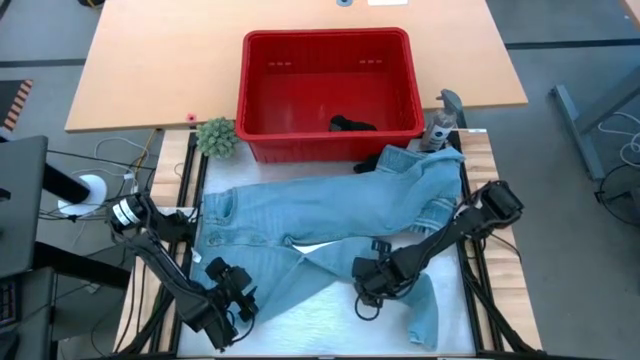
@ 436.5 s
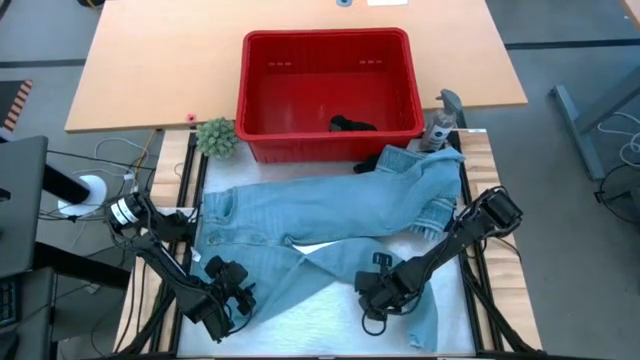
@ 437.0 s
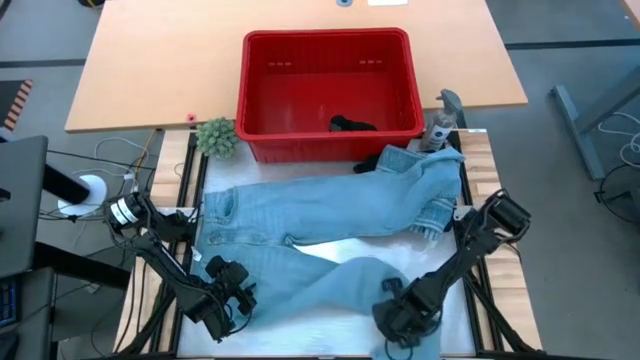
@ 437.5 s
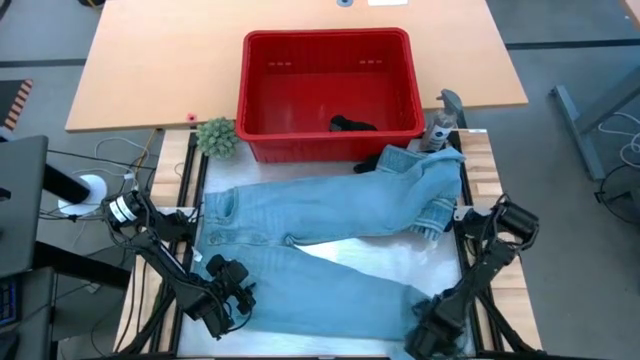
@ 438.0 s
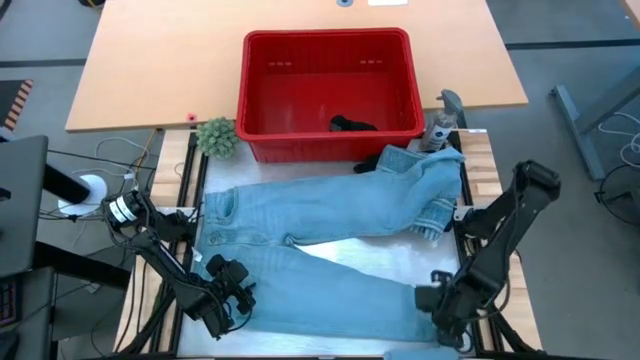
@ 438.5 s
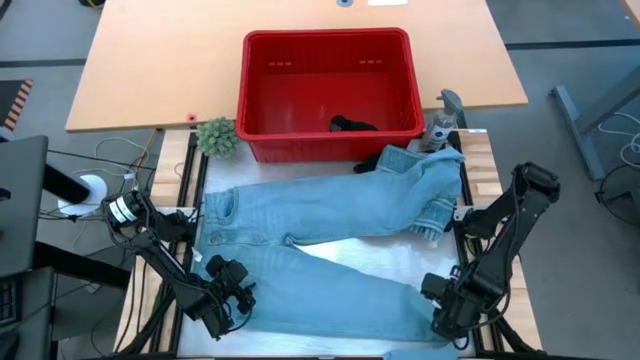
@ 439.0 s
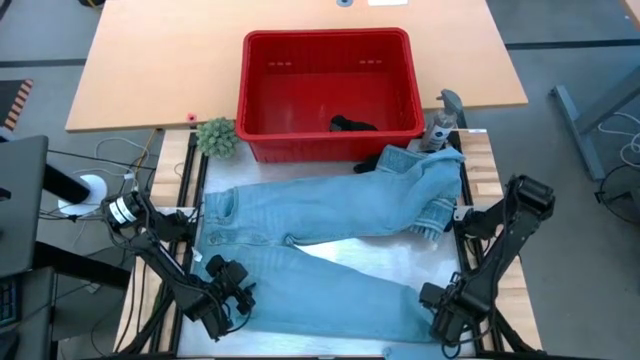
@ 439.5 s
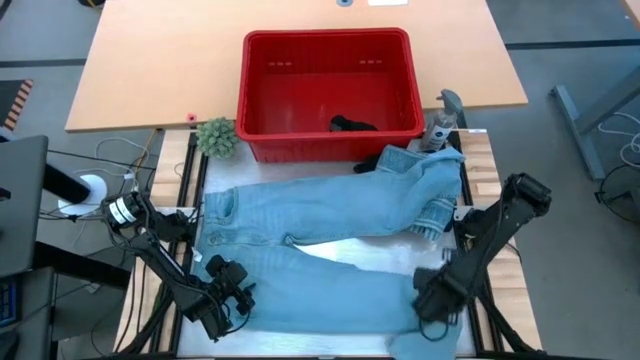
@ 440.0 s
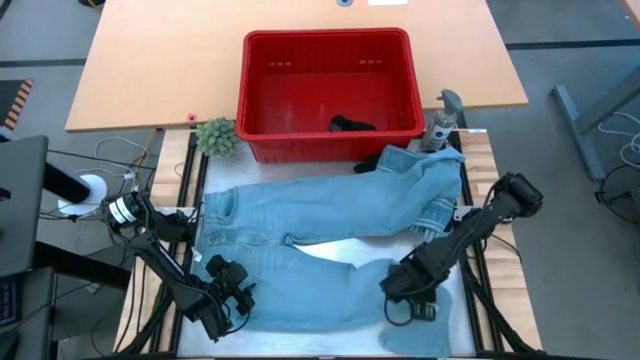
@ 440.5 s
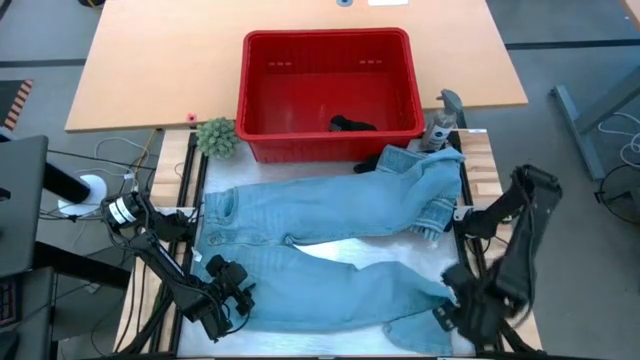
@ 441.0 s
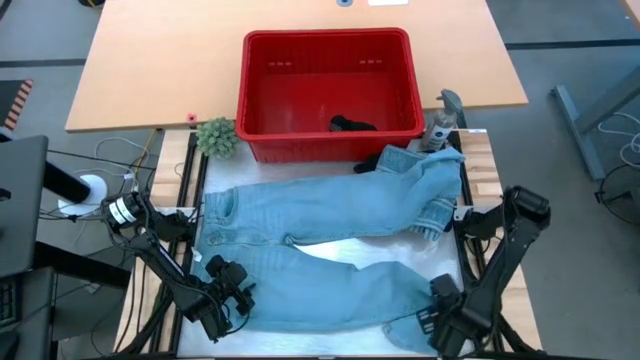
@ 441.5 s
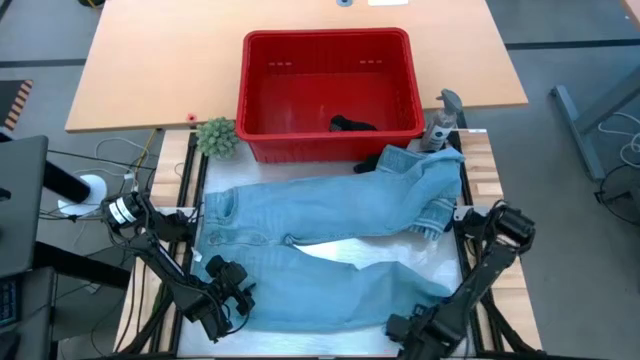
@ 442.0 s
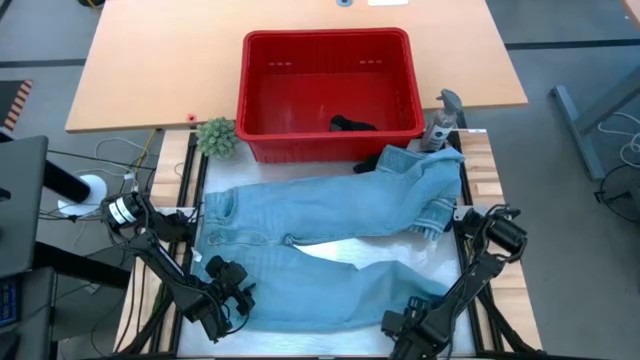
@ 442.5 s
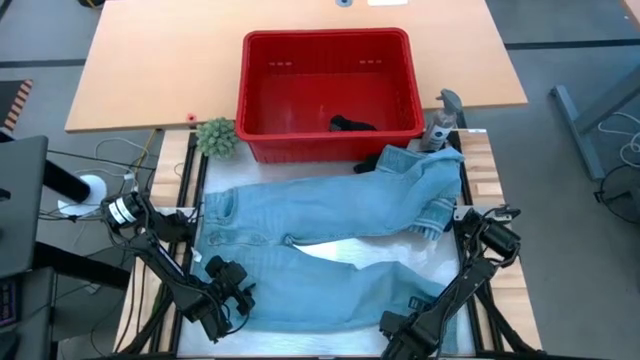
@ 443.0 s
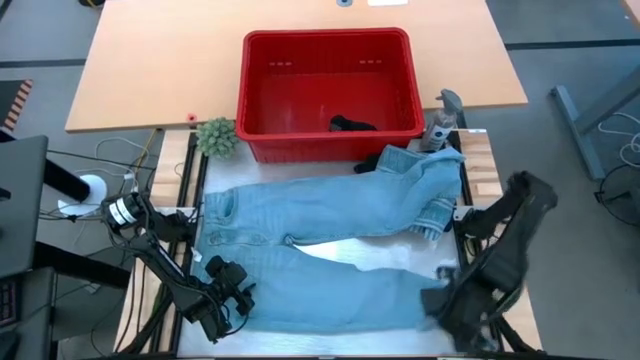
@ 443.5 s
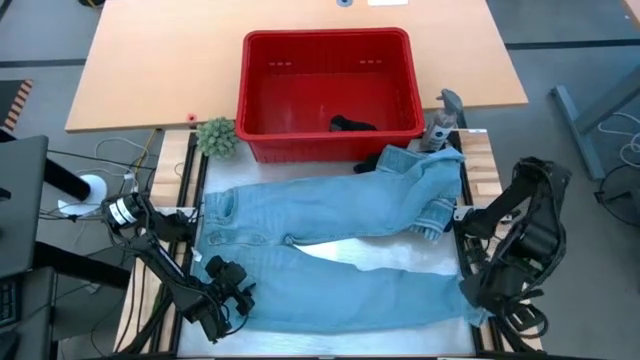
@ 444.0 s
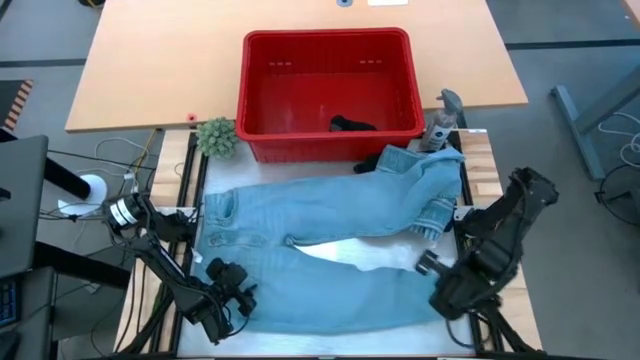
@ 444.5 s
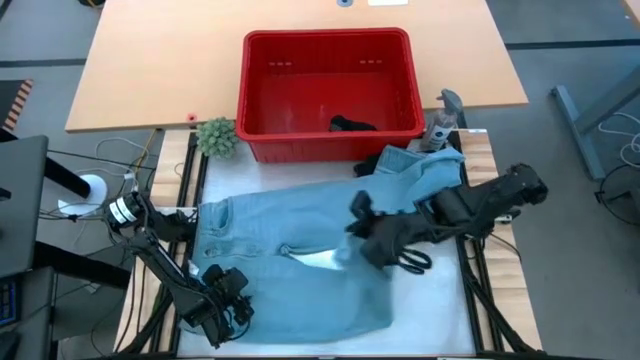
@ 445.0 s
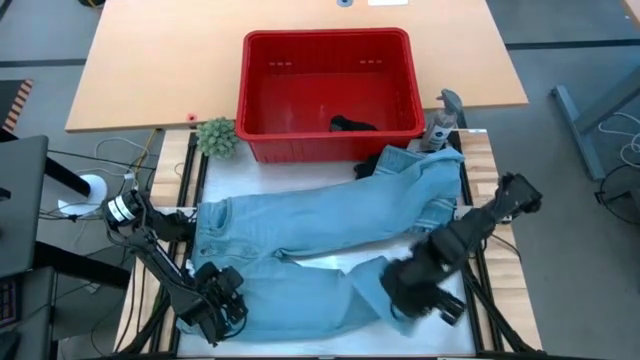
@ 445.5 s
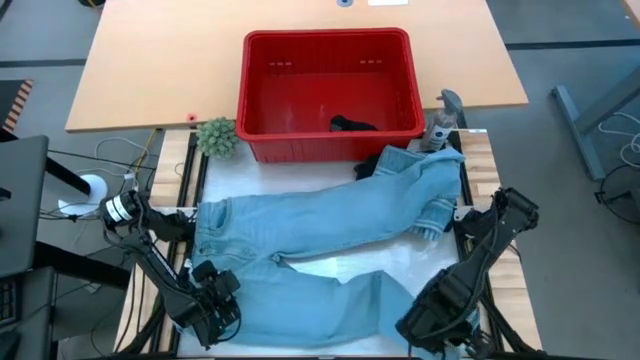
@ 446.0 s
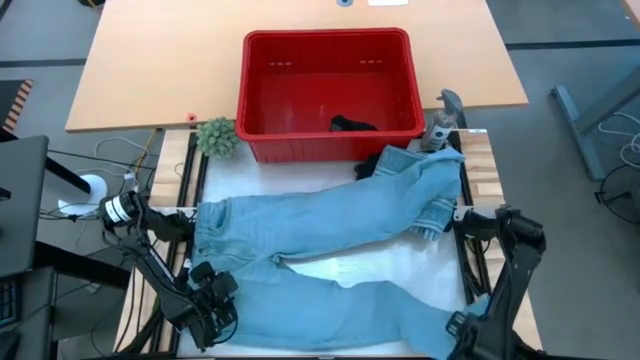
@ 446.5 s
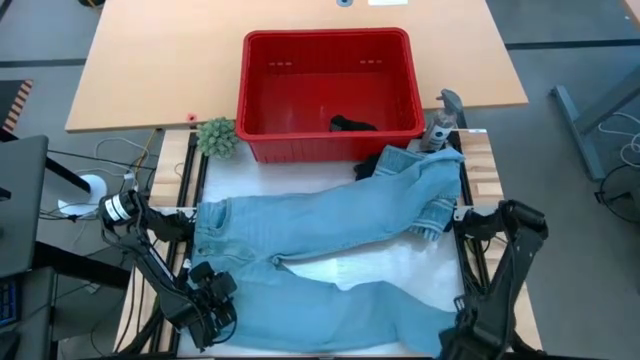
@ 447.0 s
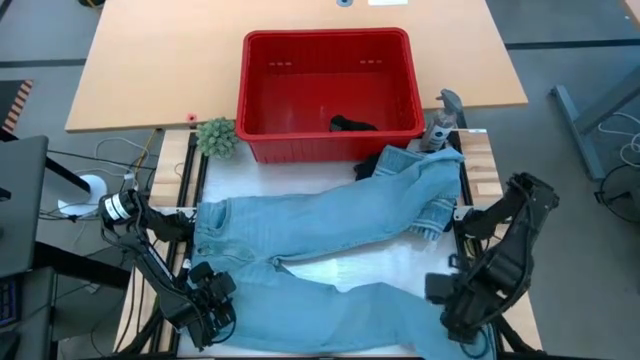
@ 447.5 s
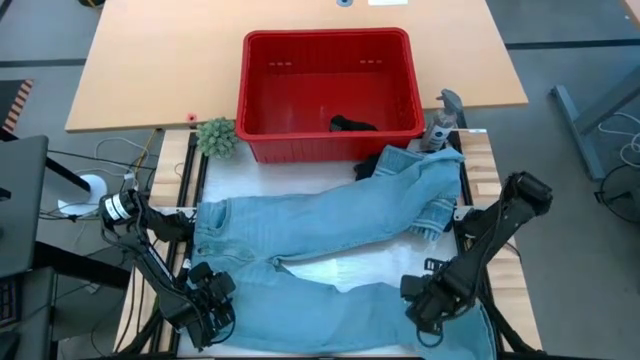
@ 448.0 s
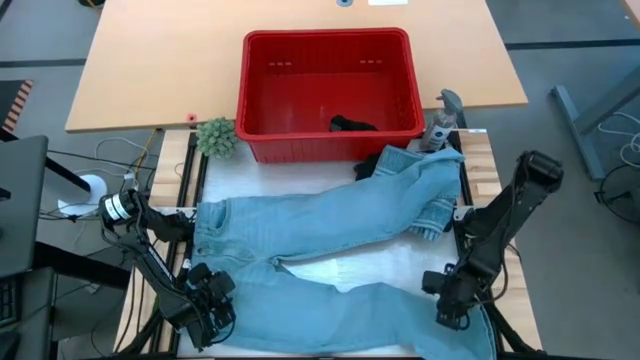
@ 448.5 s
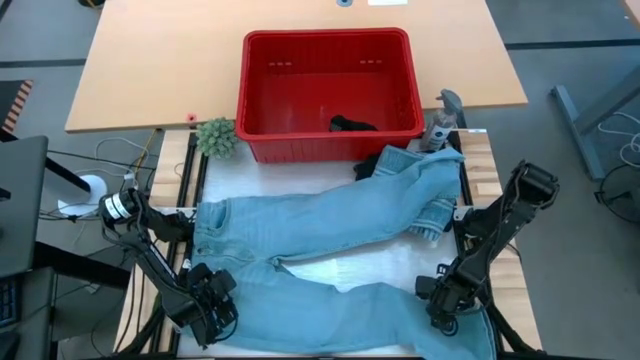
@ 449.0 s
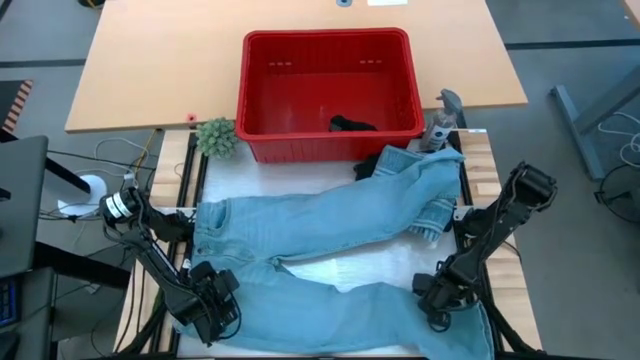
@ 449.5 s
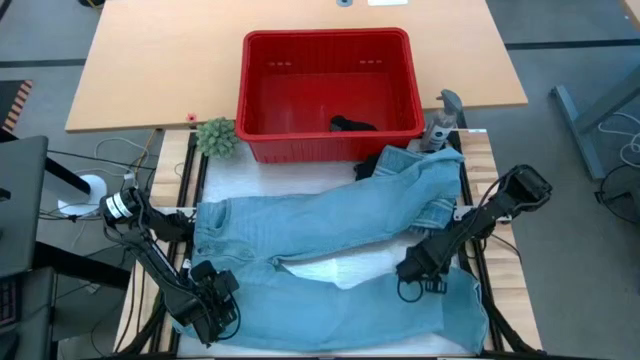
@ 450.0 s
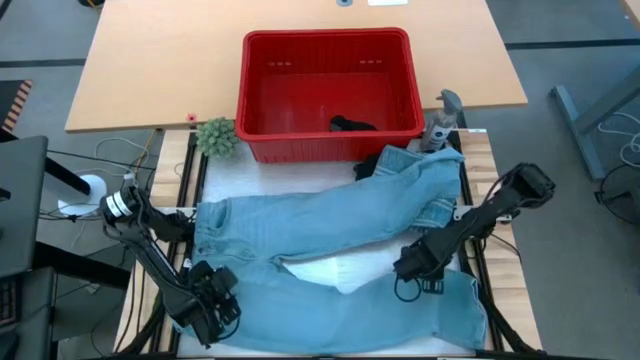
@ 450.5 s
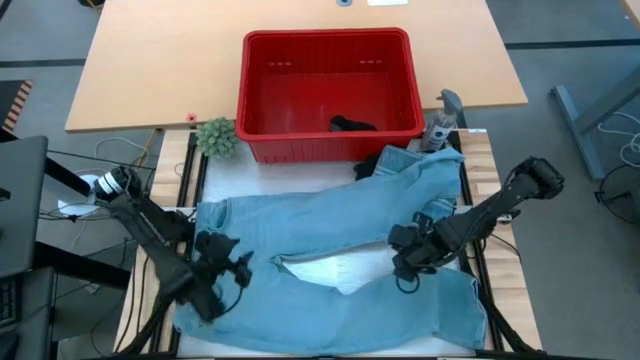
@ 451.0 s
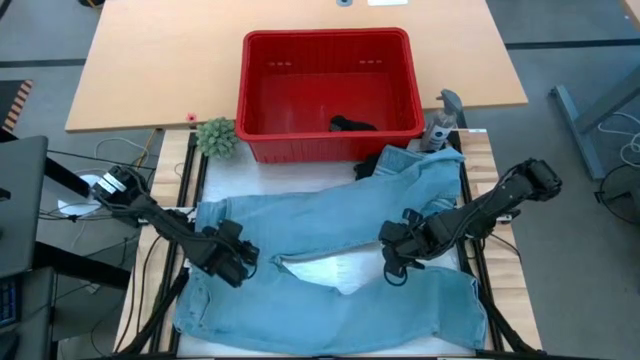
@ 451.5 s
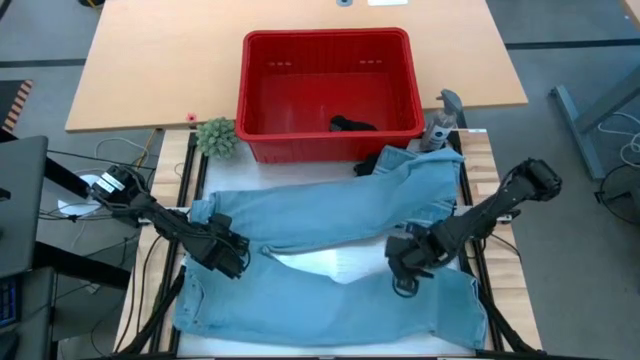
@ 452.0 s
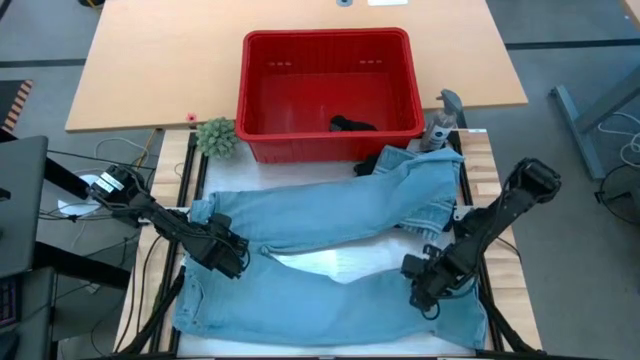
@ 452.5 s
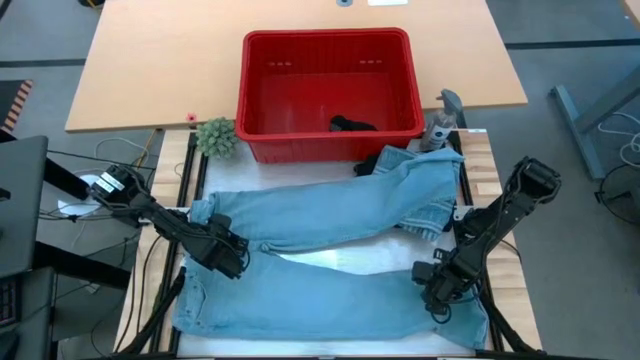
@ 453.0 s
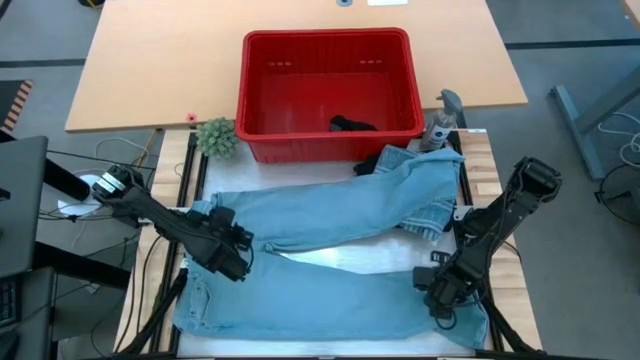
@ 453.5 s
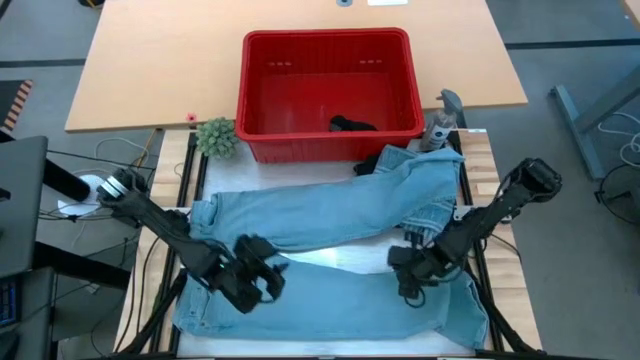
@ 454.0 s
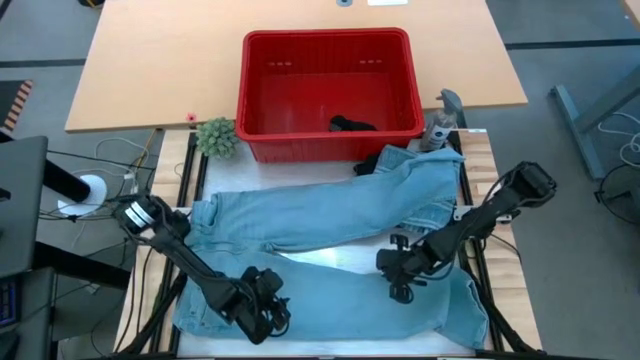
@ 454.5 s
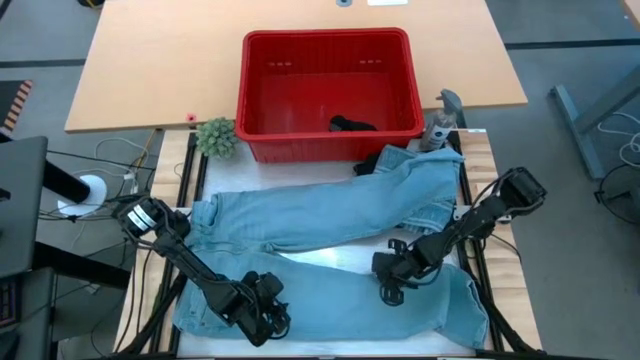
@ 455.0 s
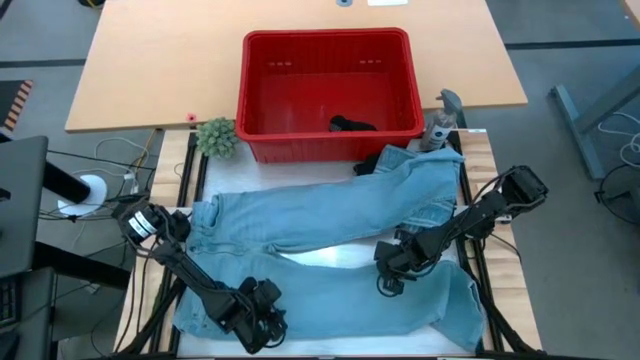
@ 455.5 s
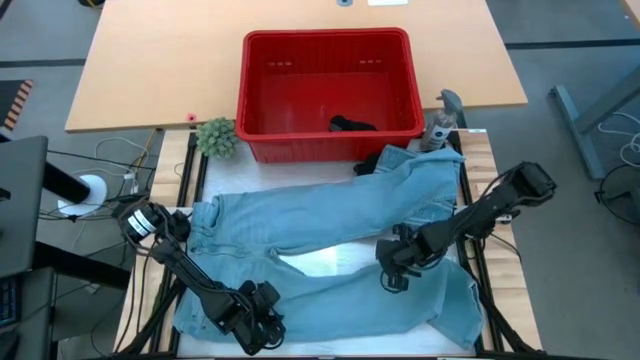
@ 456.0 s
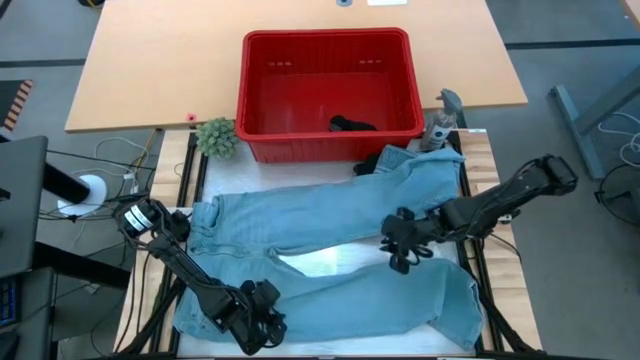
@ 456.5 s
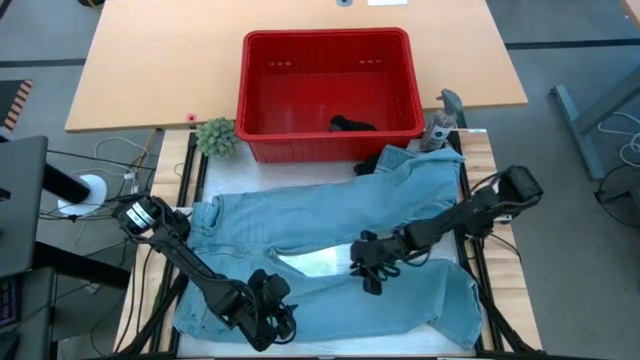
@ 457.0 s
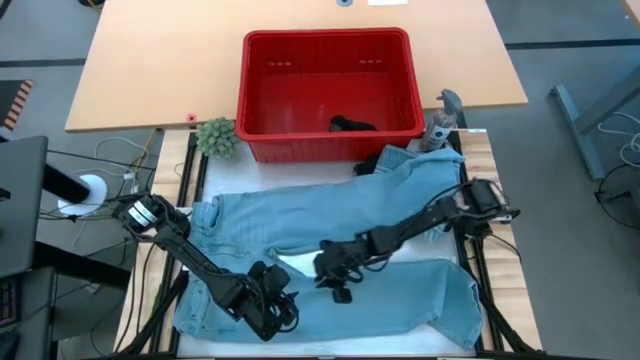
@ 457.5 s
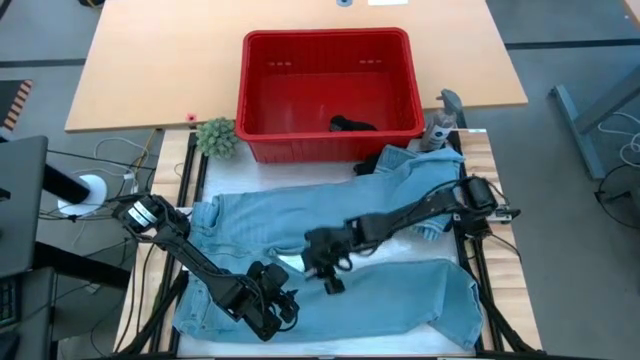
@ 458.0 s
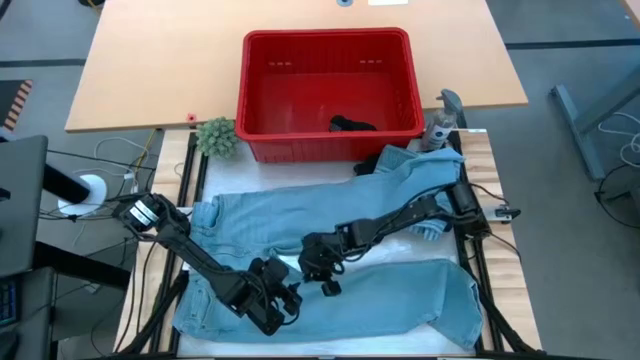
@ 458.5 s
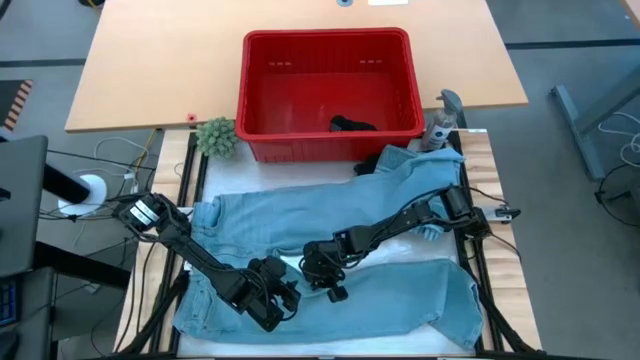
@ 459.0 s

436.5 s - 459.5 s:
Task: Fold Laundry from Bin
Fold the blue pants
